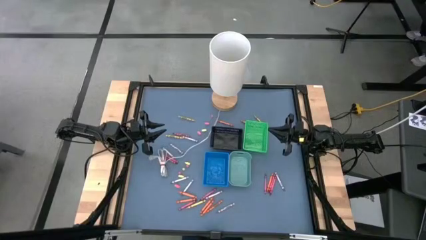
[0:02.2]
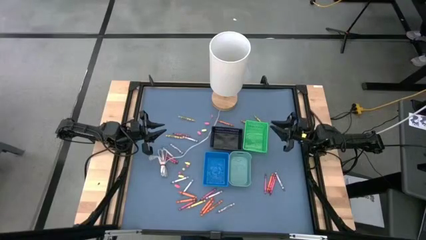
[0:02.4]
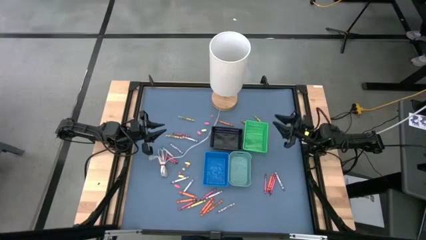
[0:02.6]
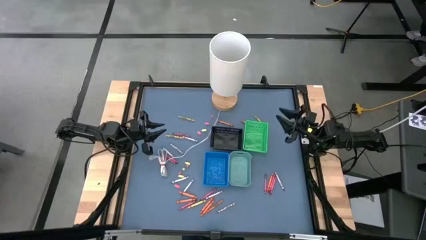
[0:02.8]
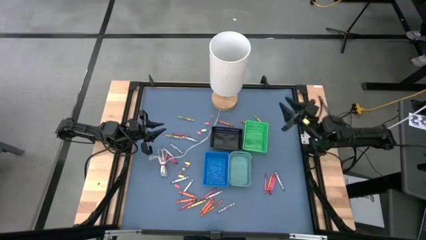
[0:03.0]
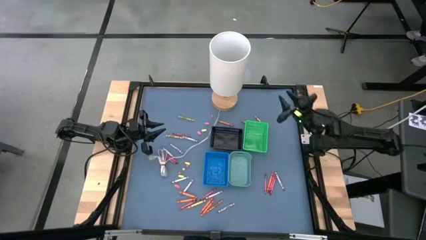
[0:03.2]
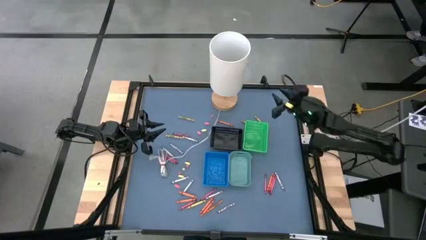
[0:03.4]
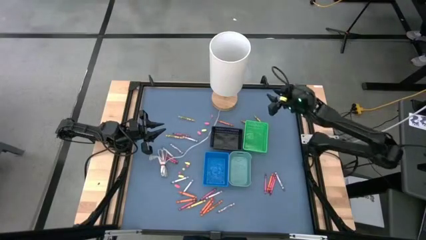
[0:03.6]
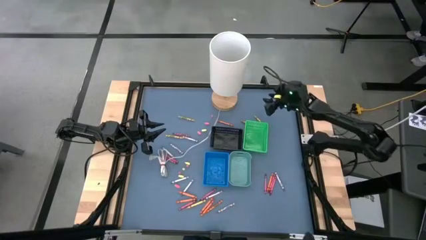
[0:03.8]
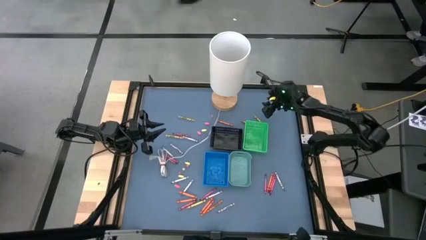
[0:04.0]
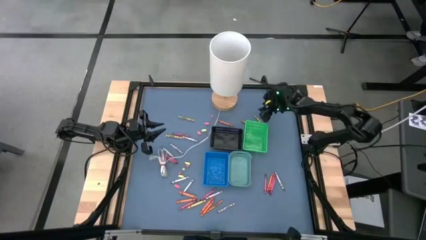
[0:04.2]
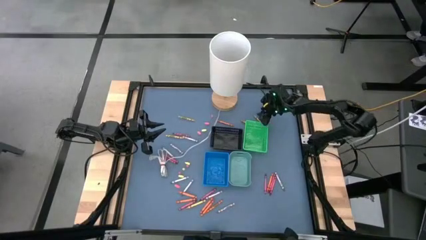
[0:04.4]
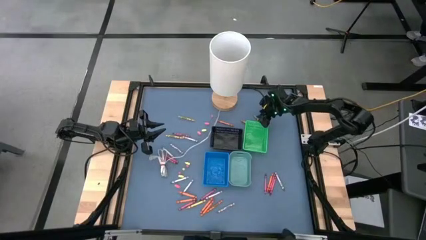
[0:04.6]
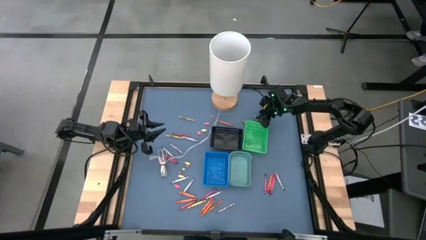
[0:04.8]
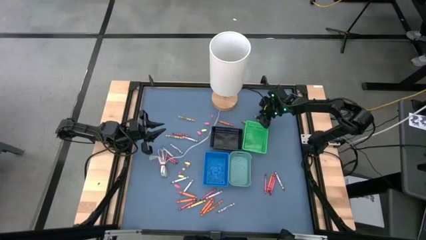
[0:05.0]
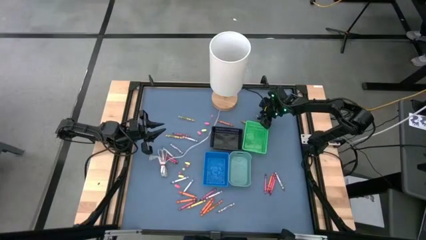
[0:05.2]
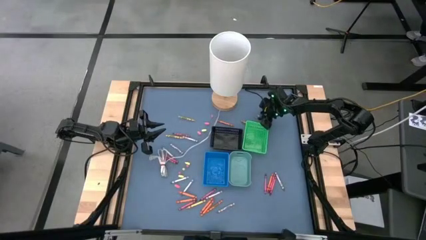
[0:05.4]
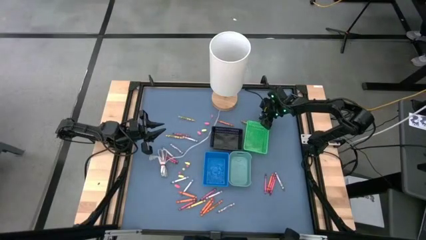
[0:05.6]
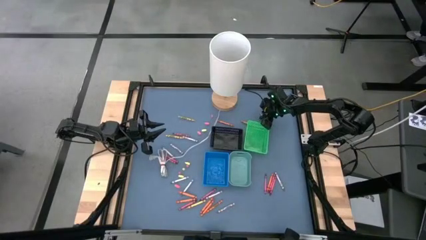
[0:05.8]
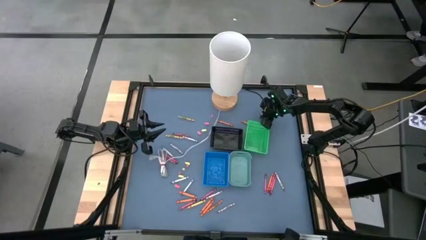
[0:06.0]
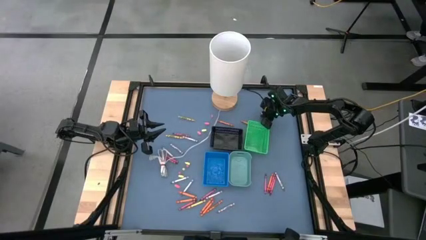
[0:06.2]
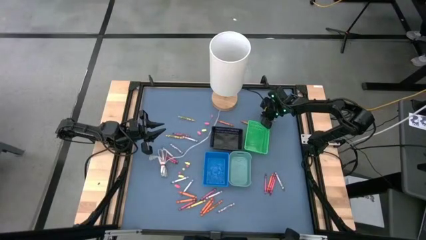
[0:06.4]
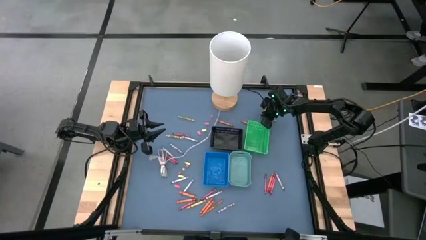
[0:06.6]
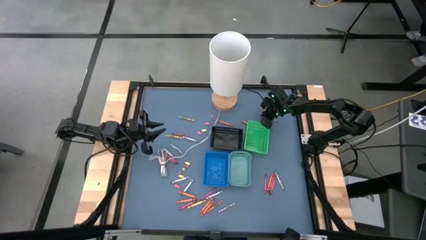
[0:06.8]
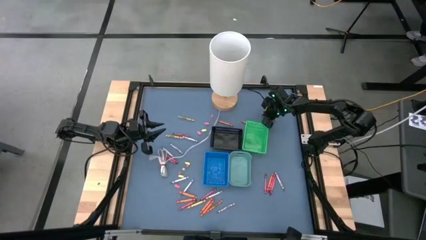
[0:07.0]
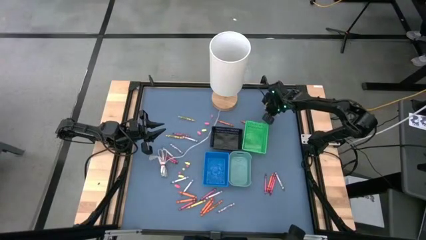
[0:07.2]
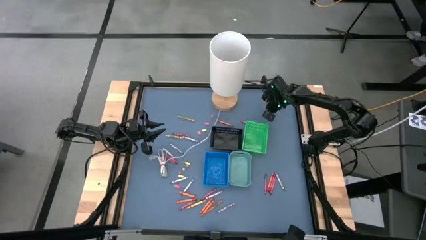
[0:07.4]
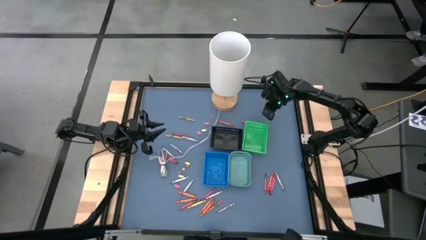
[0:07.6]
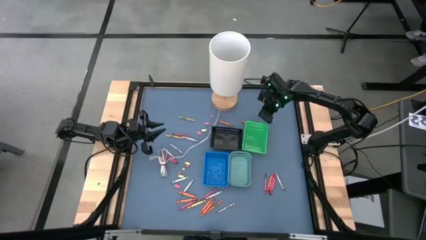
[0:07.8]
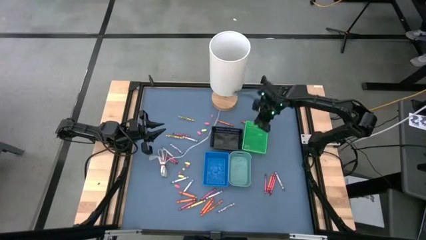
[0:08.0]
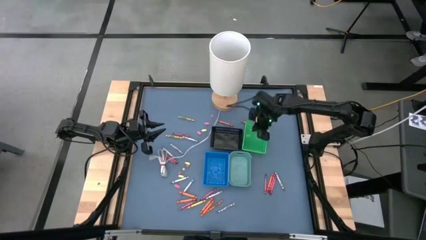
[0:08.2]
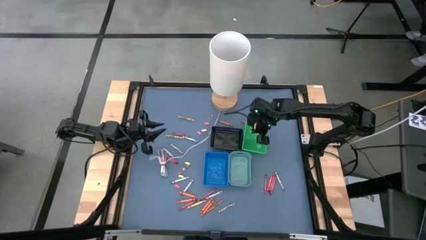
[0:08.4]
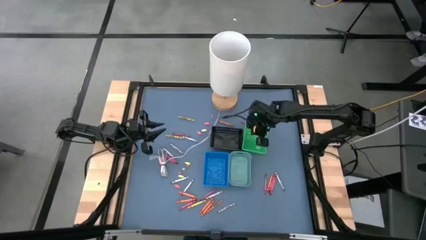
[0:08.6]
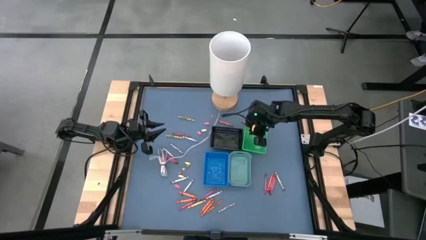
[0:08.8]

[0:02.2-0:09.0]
Task: Sort crayons
Put the yellow crayon into the green bin

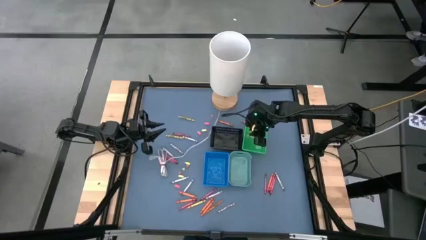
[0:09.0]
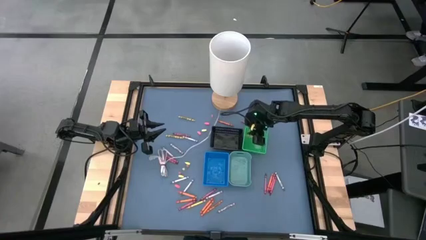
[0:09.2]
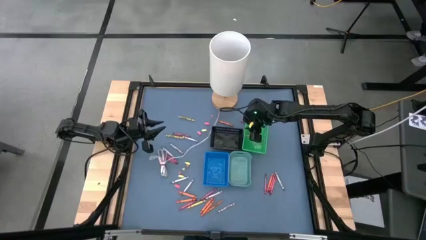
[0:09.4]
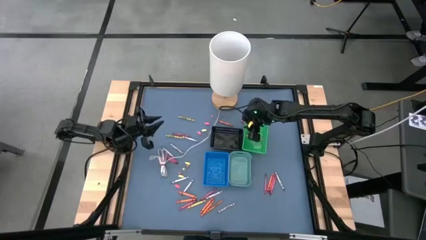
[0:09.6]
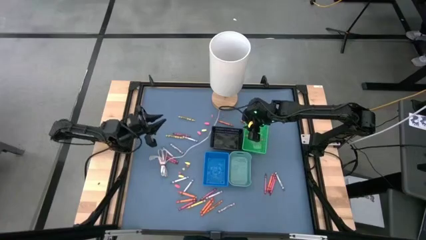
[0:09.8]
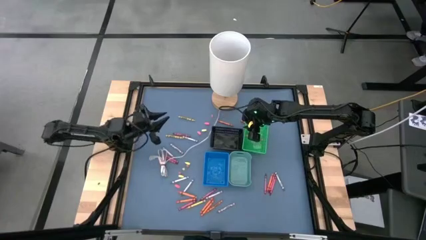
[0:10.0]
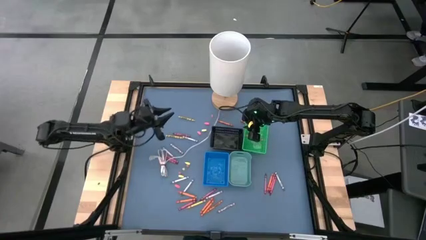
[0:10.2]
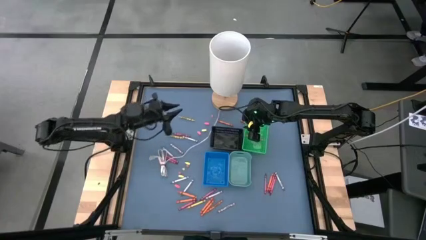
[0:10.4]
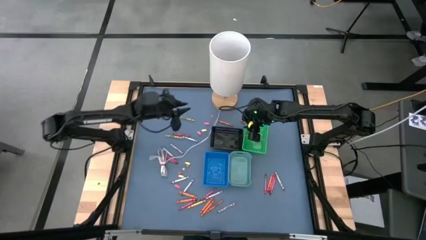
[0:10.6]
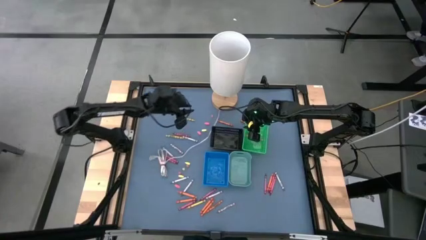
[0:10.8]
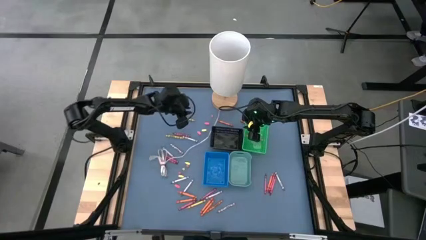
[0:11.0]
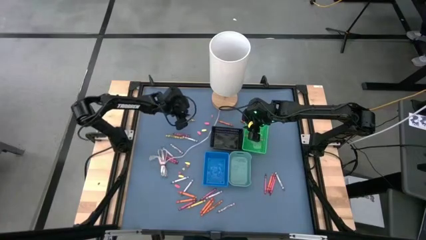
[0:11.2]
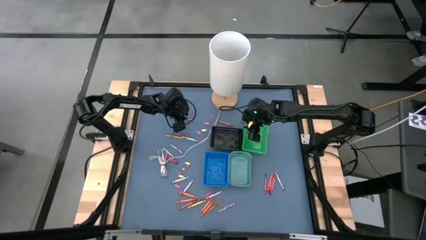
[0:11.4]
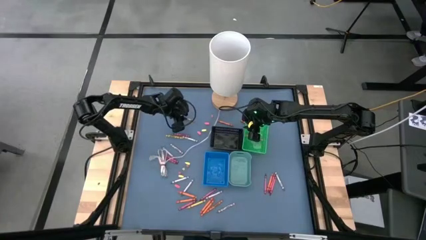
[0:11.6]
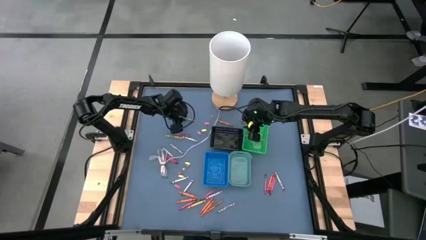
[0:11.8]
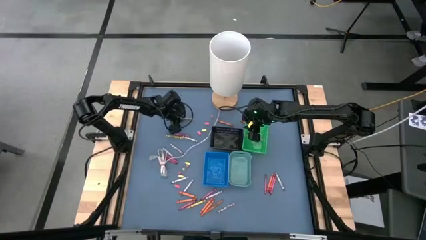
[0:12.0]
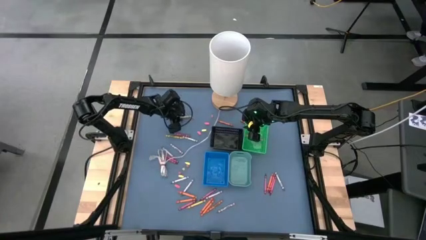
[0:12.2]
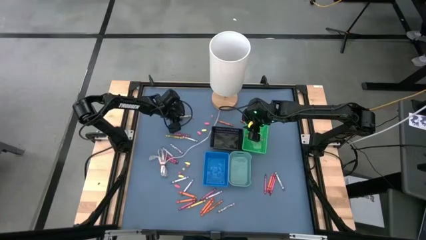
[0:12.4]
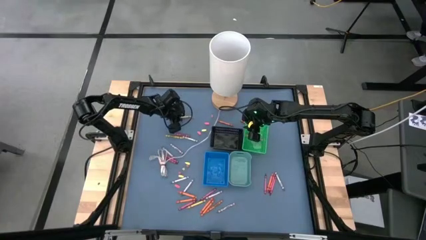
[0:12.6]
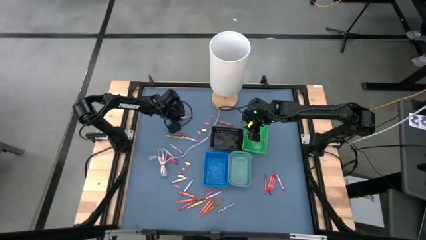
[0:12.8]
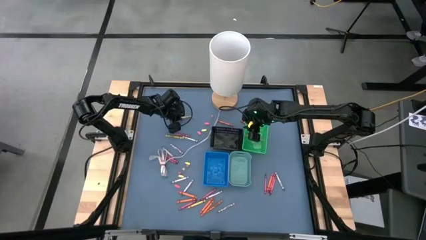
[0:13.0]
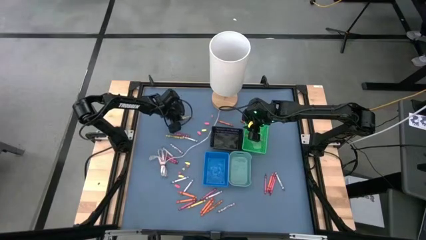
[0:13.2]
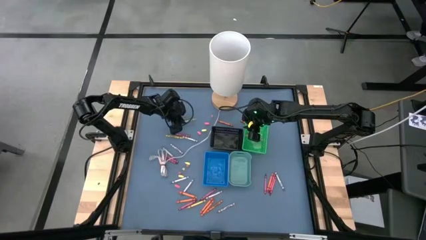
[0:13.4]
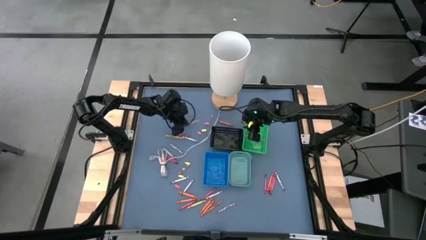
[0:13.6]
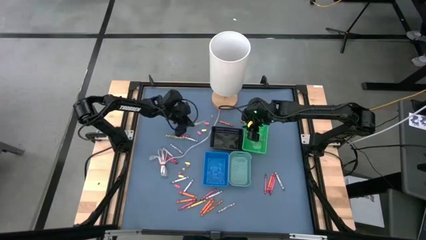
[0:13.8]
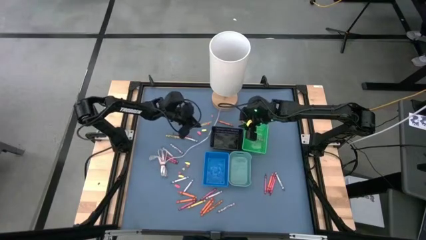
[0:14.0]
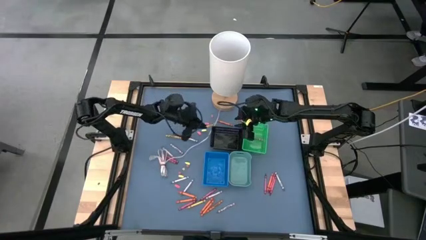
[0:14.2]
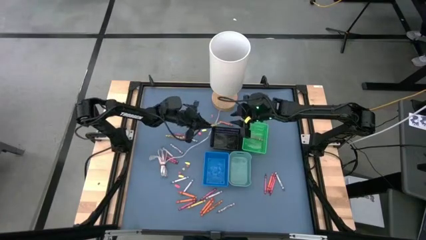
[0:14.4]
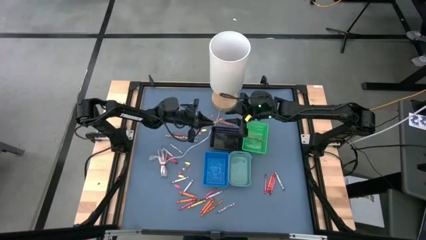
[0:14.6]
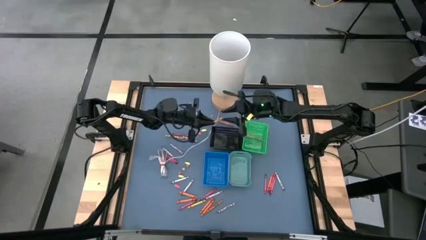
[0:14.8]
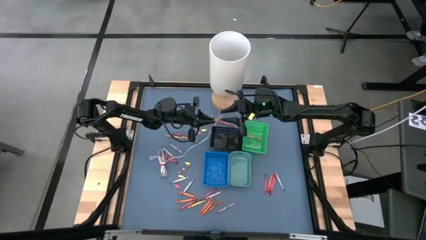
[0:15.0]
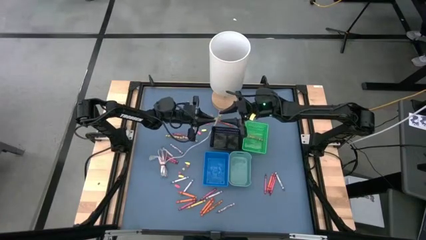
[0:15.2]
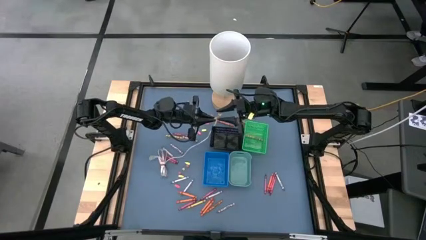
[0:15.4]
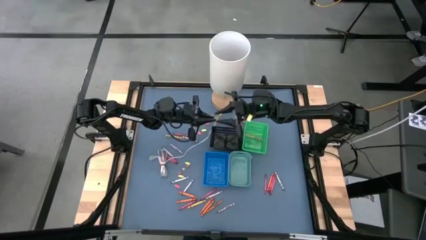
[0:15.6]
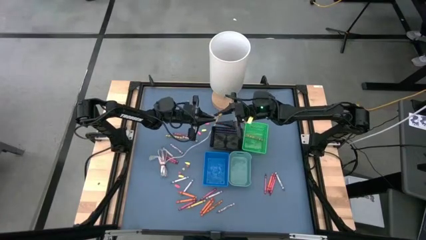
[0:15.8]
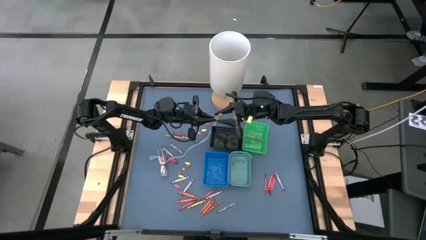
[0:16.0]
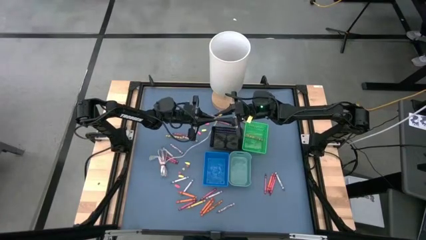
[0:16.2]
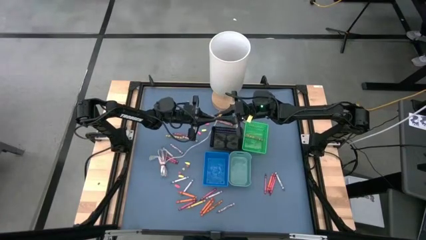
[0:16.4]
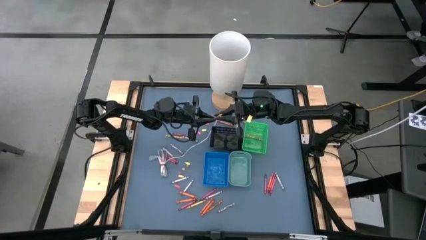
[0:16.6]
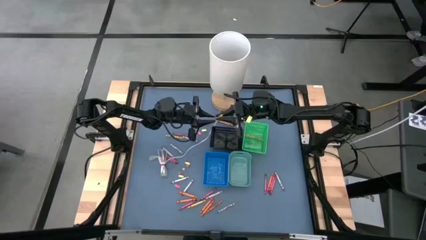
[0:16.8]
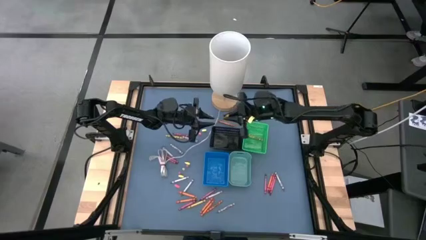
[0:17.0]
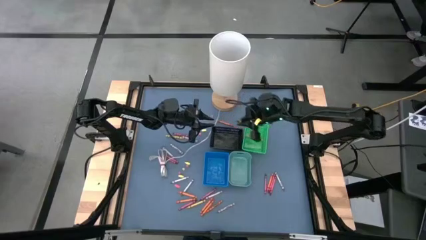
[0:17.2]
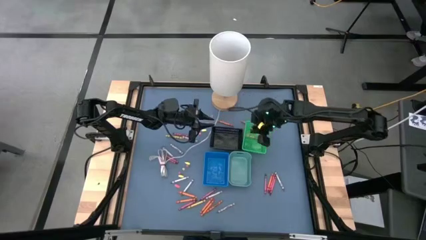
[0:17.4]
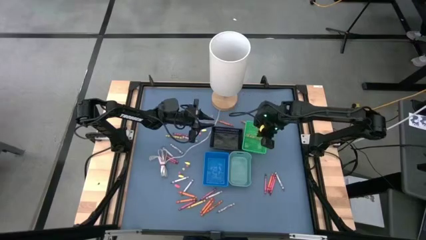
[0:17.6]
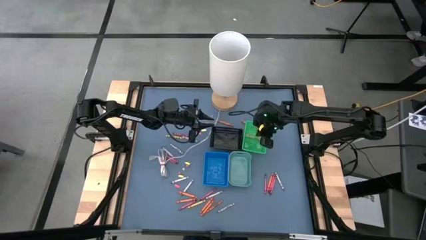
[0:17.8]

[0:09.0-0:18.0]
Put the yellow crayon into the green bin

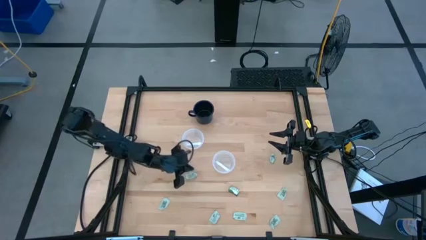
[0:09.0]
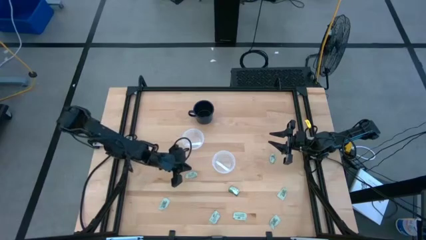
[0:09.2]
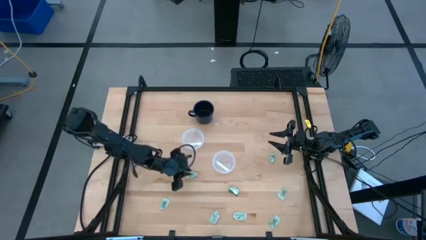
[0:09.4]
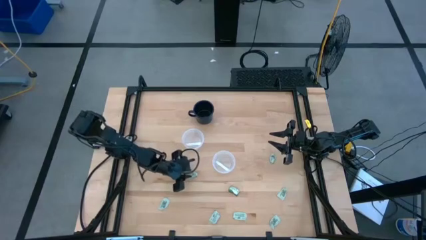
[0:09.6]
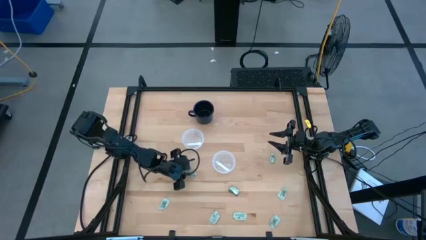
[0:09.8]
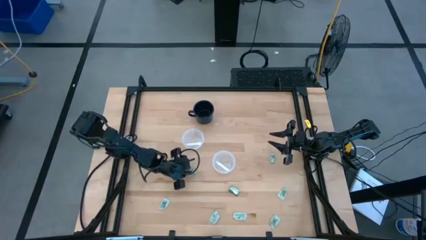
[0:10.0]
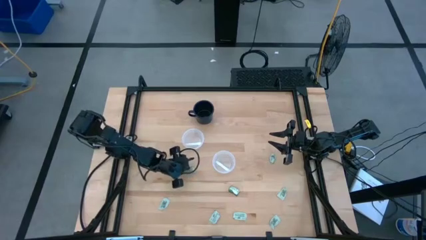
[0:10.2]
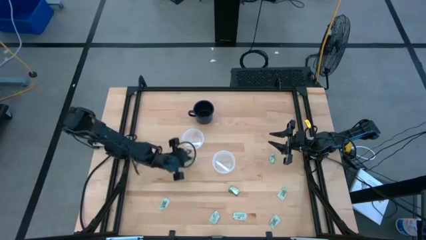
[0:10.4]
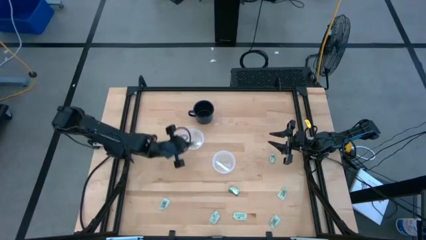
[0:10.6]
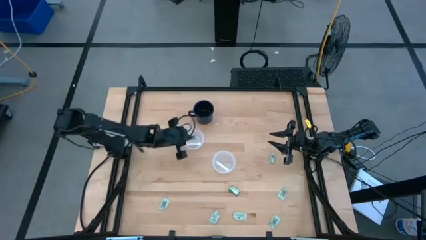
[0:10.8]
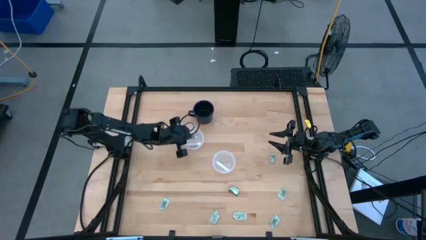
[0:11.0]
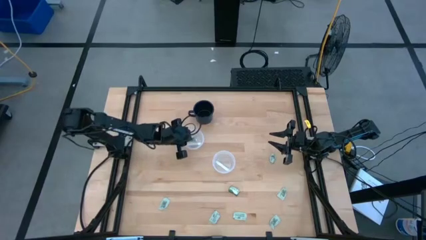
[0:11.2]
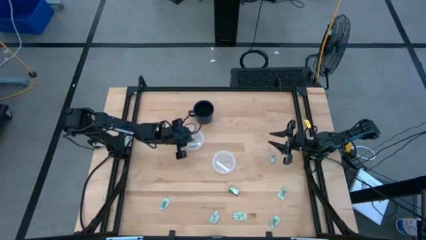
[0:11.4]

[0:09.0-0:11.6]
Task: Pick and place Stevia / Truvia into bins
Put the stevia packet into the top round transparent container
